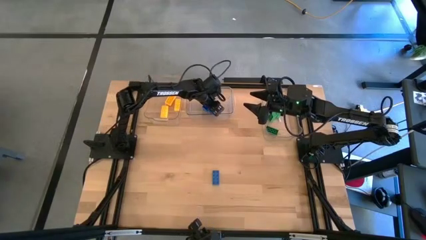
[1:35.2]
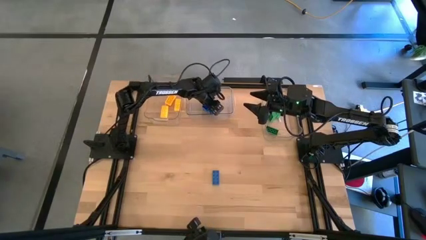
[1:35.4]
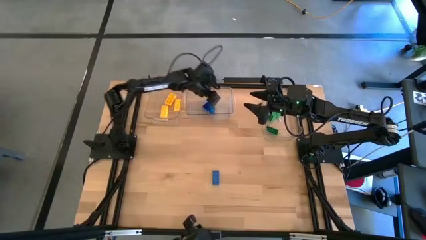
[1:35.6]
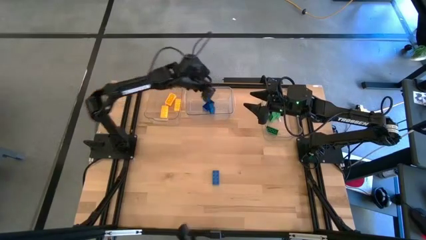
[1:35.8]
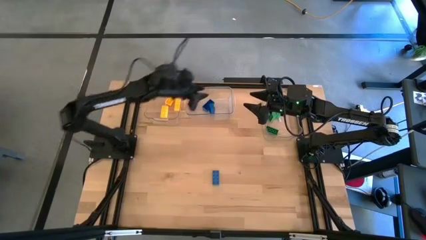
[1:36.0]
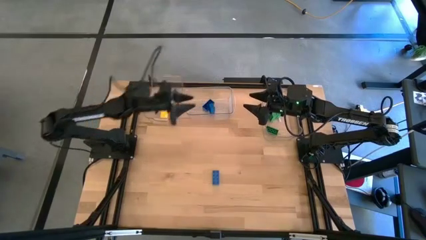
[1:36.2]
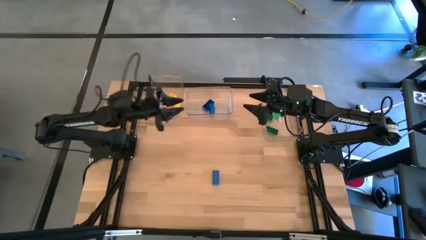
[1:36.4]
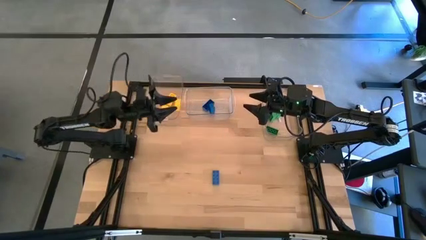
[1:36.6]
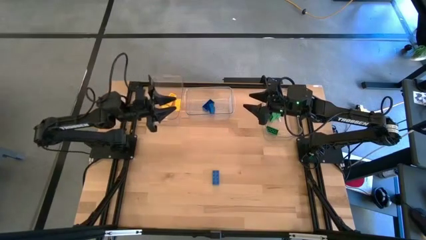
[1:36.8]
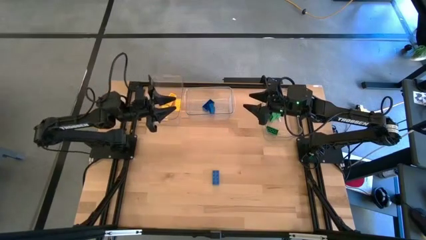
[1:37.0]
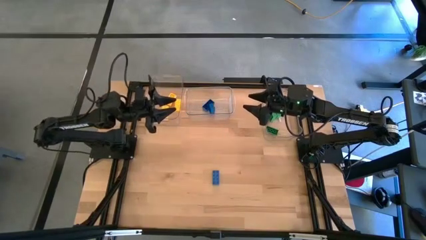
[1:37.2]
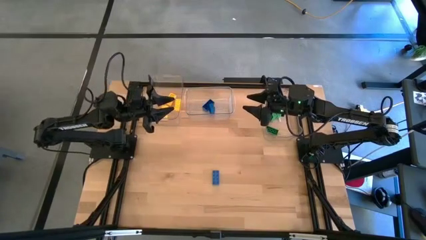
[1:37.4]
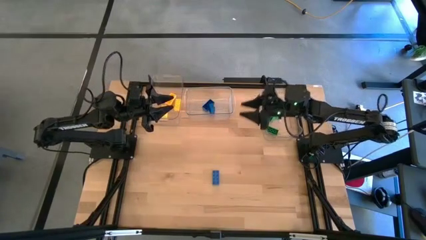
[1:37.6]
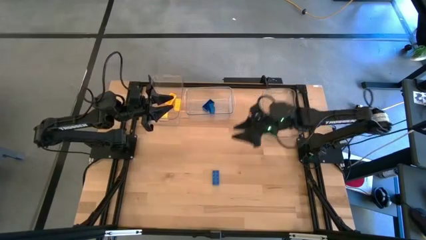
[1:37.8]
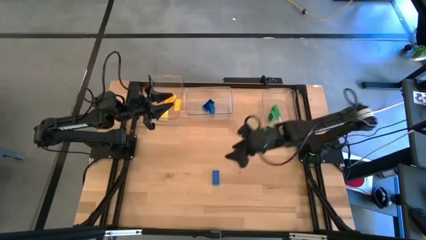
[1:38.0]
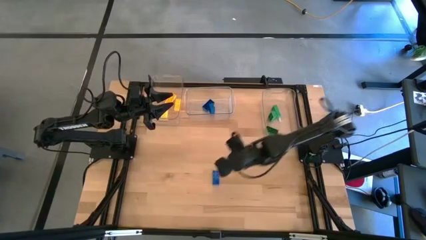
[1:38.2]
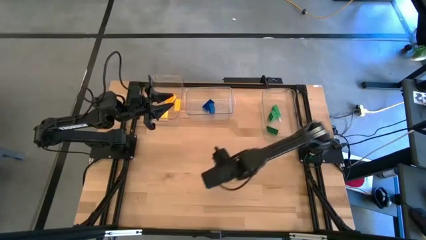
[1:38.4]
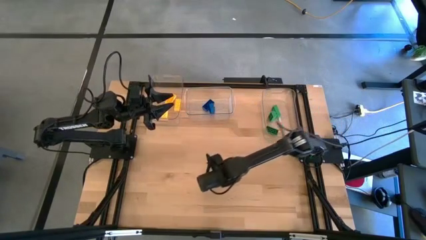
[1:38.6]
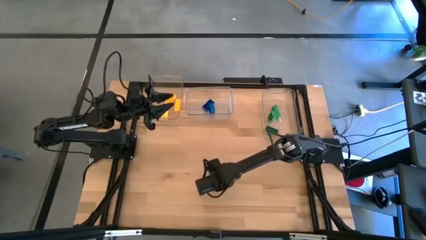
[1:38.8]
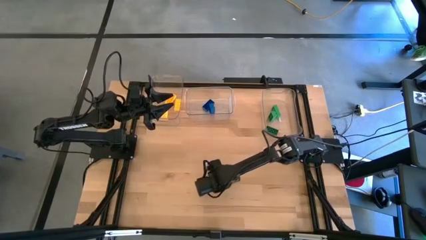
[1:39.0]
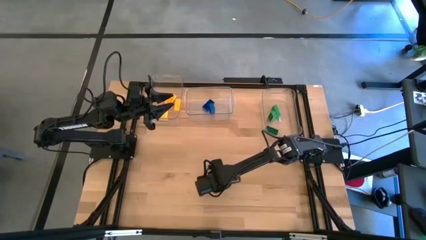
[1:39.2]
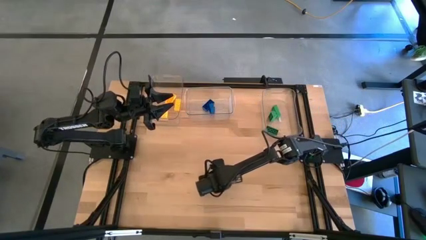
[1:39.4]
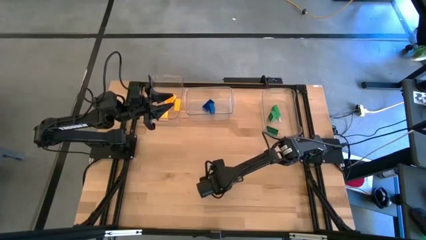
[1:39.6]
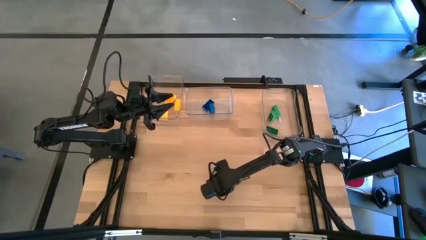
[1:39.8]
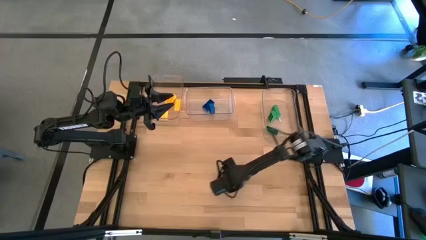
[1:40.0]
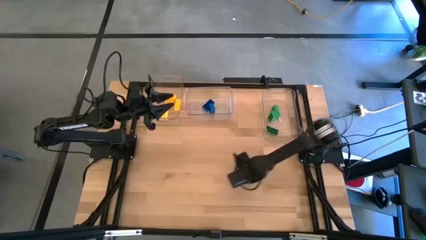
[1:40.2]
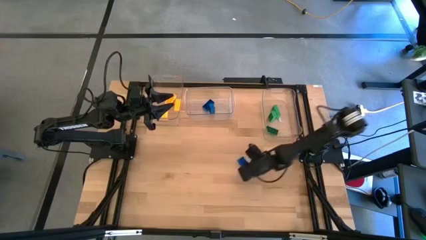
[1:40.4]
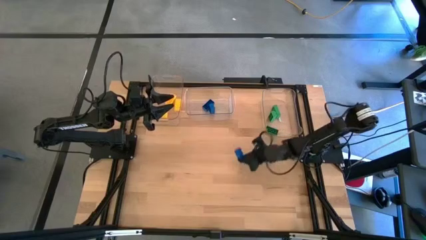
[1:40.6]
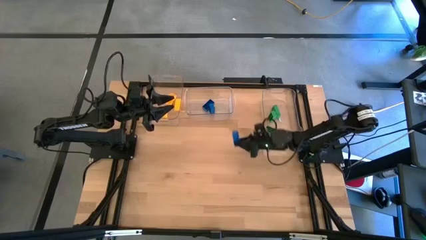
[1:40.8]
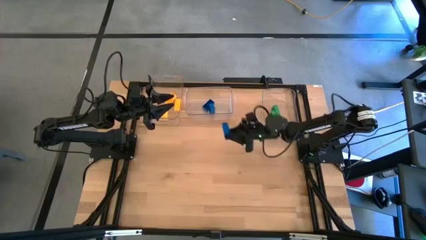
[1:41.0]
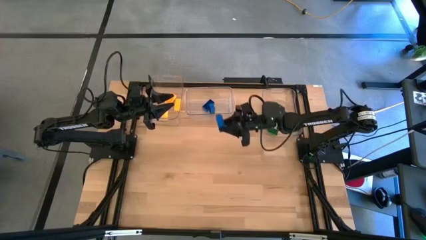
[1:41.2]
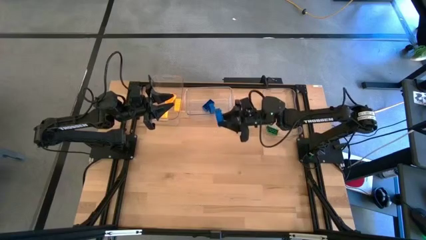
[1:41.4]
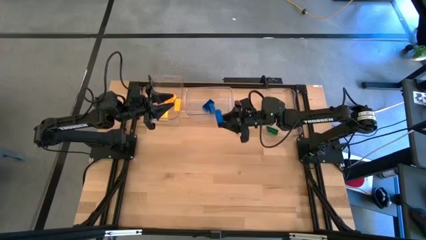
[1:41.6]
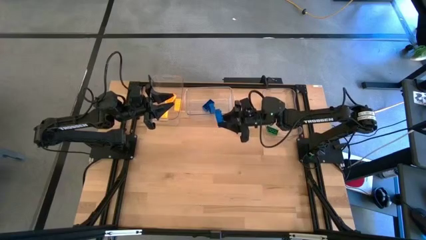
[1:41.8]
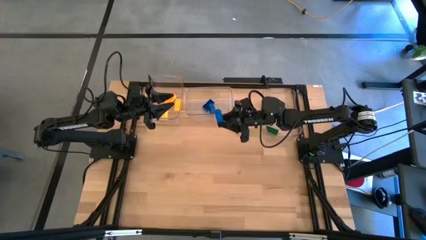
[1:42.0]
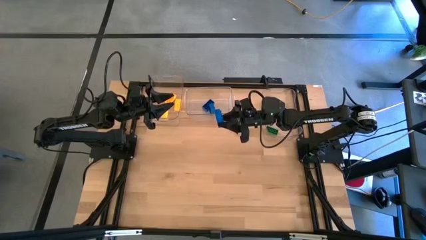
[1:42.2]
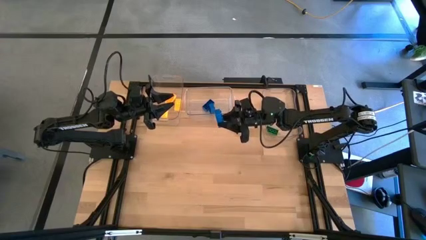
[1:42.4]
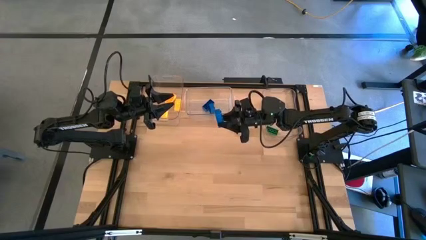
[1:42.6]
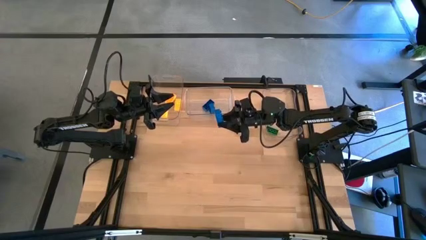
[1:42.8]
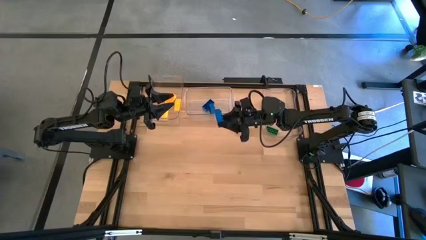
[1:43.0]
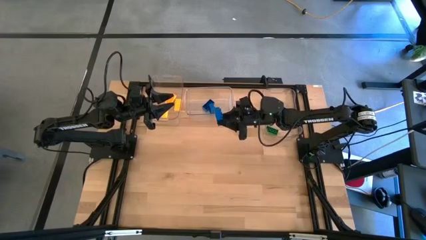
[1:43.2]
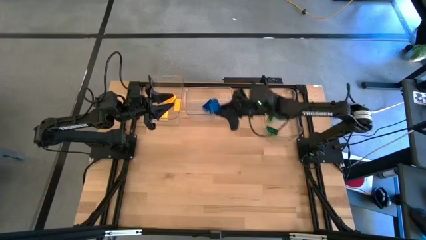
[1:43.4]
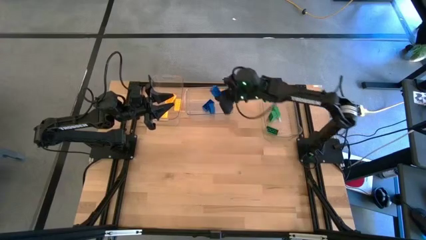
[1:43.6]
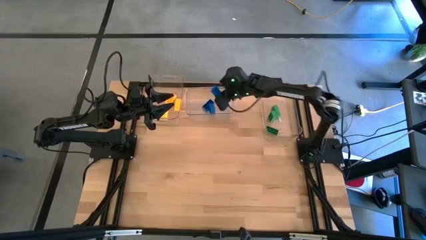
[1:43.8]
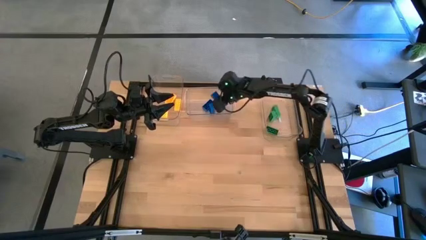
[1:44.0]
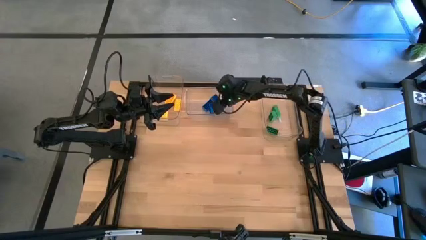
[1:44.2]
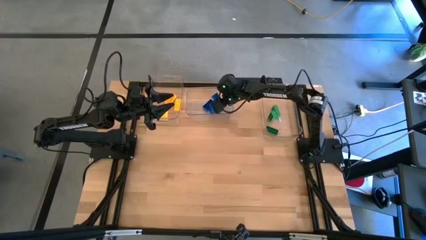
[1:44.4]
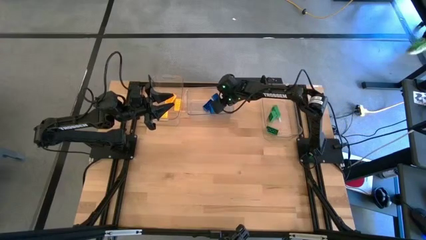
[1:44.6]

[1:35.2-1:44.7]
Task: Sort & place blocks by color
Put the blue game piece into the middle transparent bin

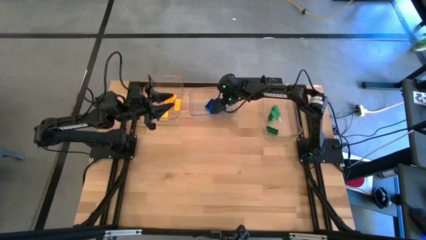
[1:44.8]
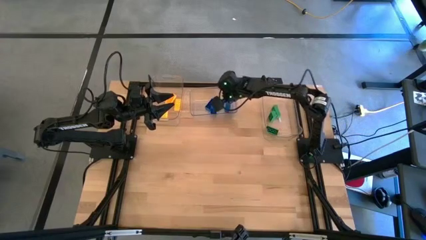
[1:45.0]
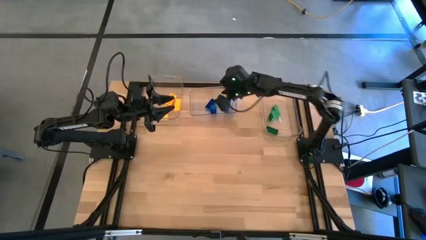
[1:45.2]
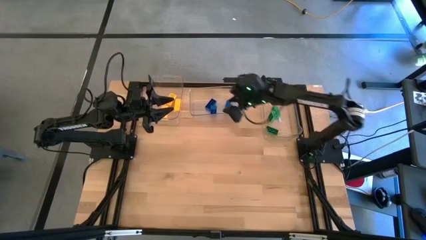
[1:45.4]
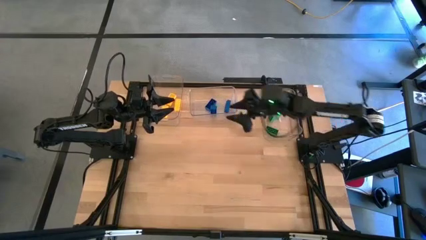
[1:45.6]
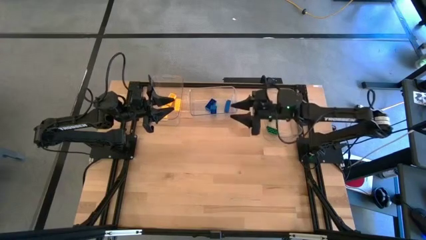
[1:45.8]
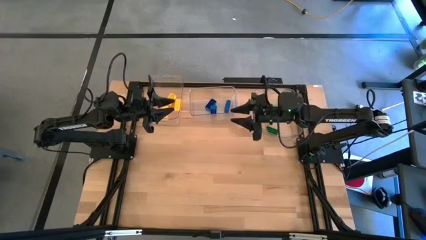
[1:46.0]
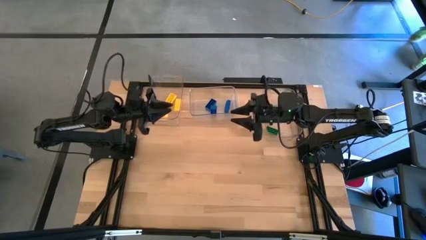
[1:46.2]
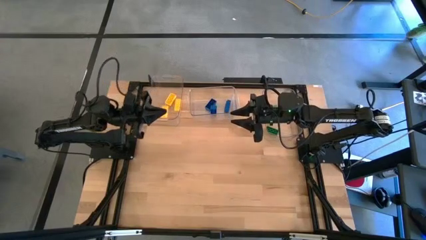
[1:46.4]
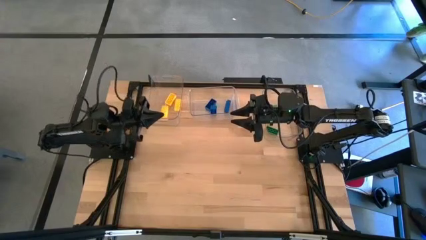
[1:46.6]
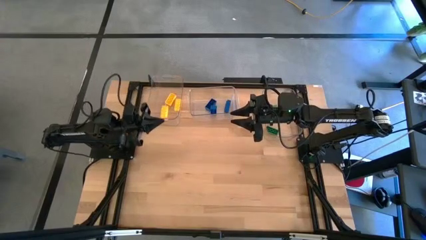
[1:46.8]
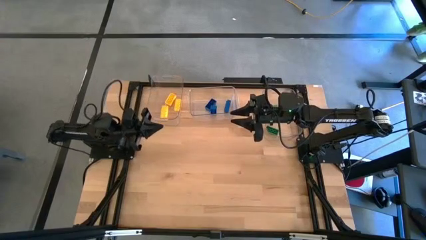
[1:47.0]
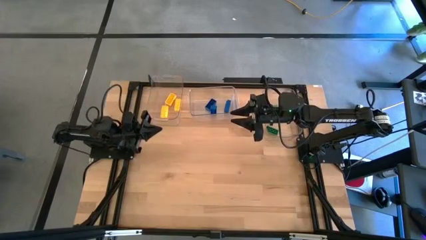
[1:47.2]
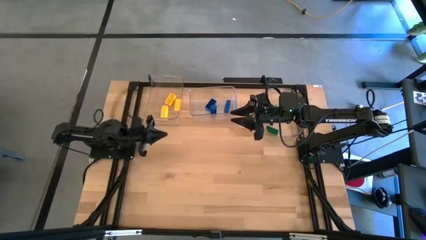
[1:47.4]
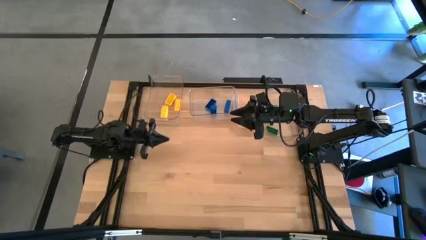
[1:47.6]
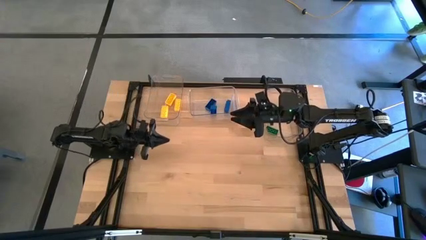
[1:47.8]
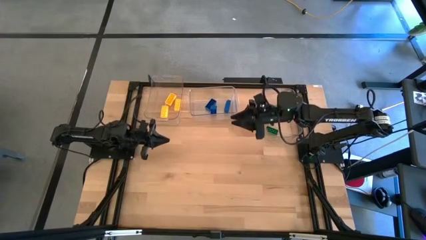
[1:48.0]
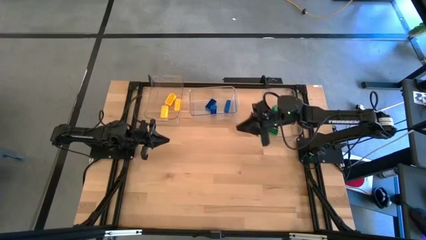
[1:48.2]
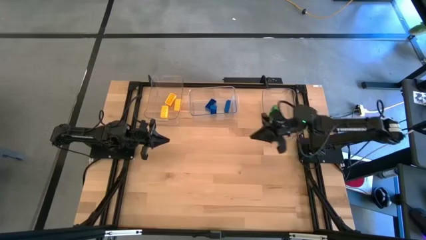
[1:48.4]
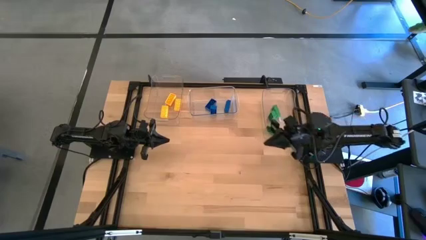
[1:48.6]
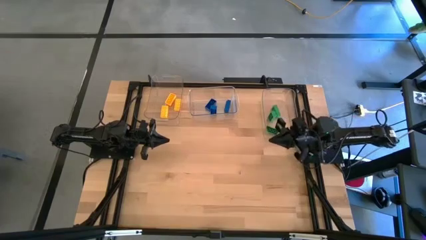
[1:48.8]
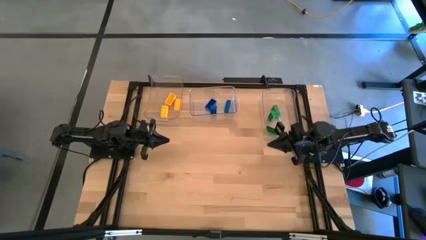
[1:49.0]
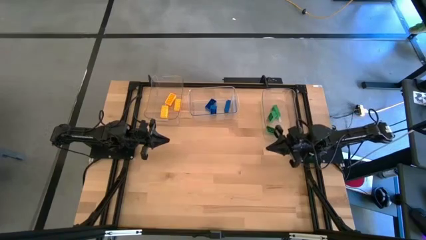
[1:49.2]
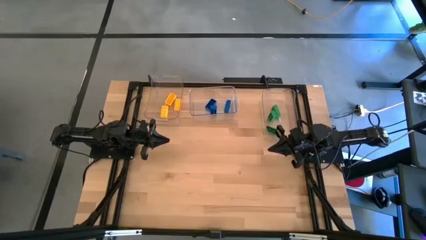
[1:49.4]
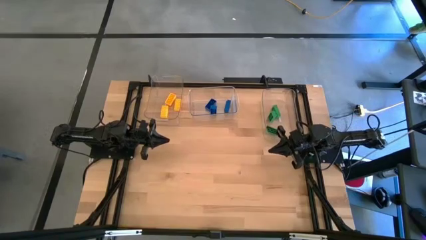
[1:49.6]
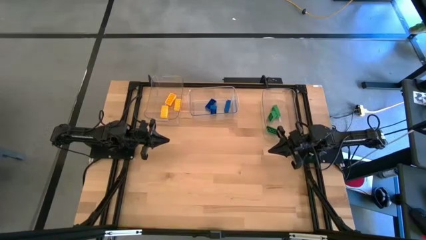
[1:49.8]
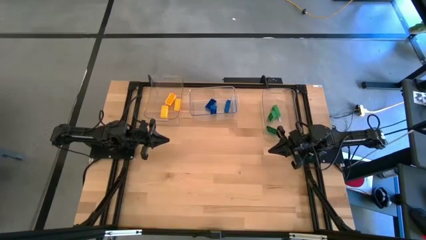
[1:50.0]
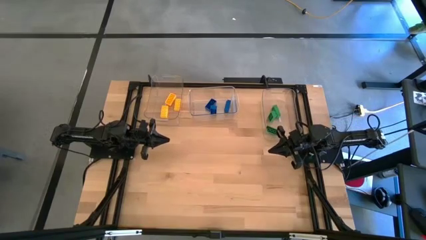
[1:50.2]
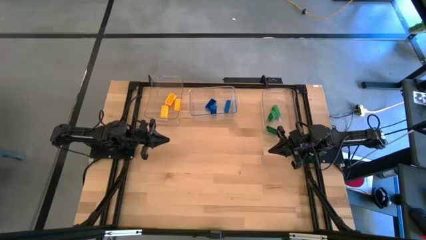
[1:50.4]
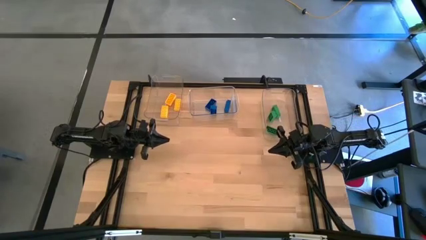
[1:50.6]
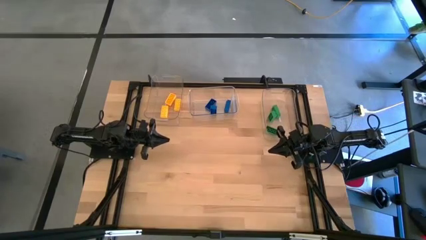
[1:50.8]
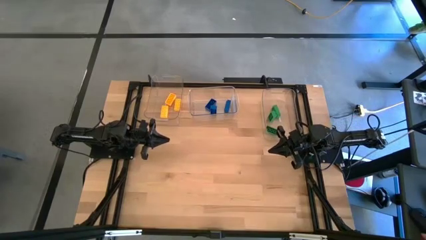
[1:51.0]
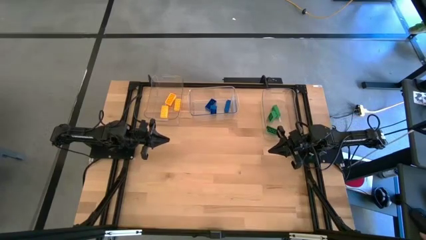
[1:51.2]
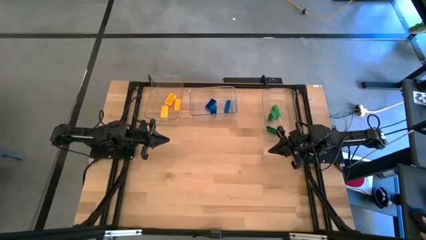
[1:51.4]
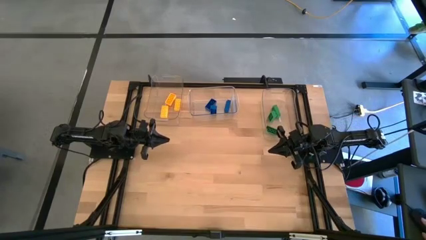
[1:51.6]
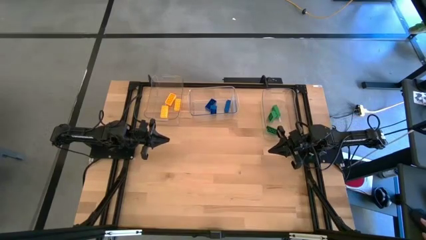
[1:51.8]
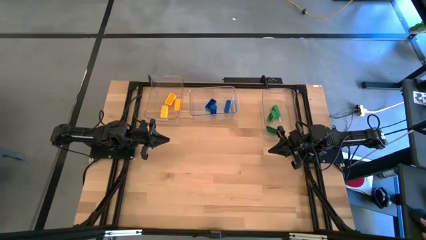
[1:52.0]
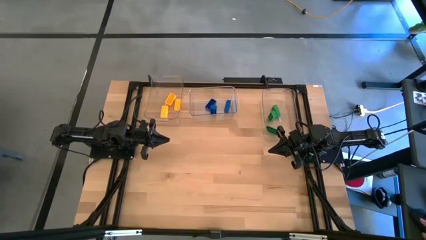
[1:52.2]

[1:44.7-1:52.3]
Return to Home Position
